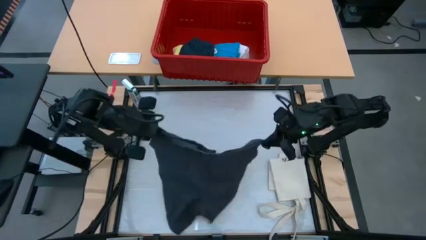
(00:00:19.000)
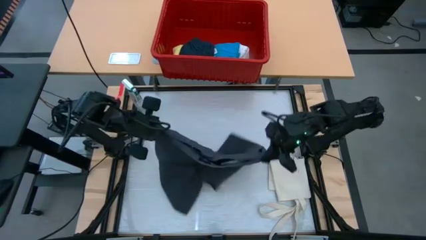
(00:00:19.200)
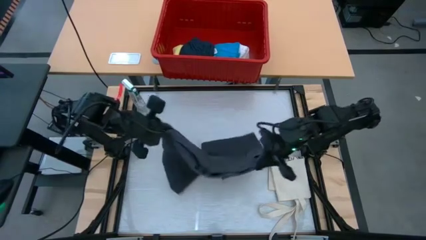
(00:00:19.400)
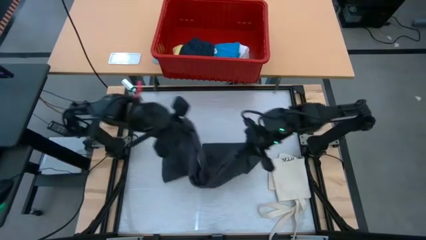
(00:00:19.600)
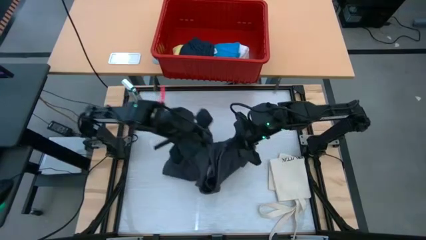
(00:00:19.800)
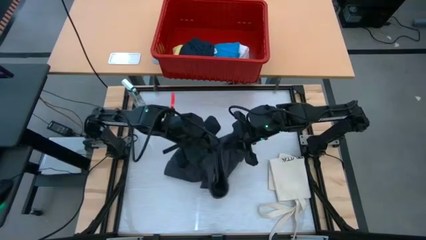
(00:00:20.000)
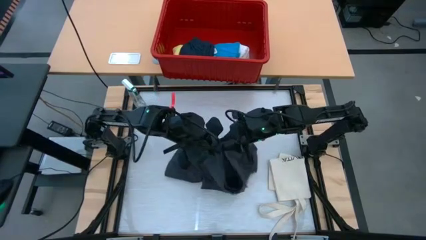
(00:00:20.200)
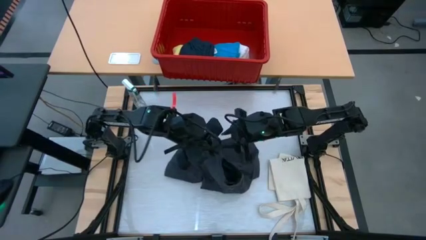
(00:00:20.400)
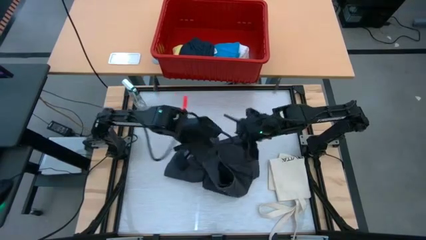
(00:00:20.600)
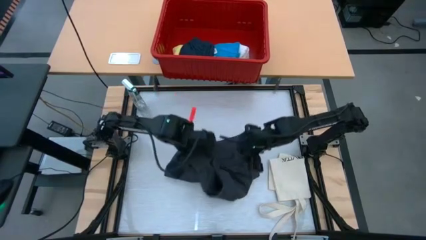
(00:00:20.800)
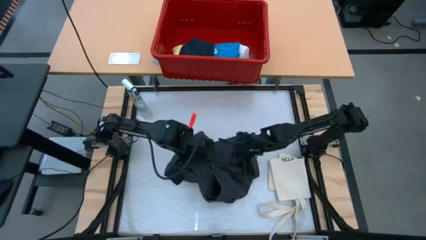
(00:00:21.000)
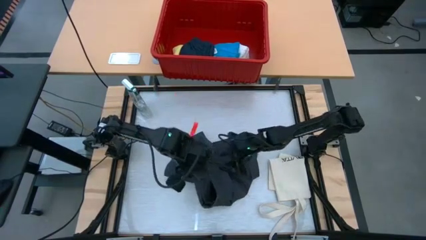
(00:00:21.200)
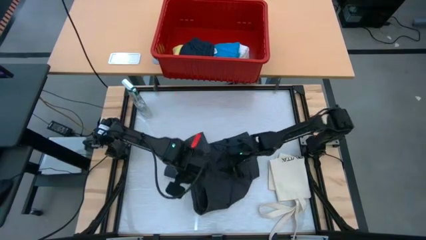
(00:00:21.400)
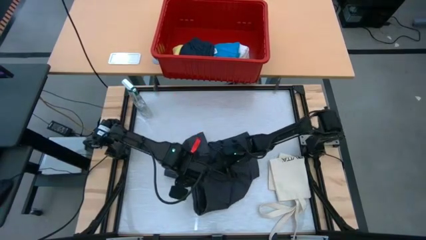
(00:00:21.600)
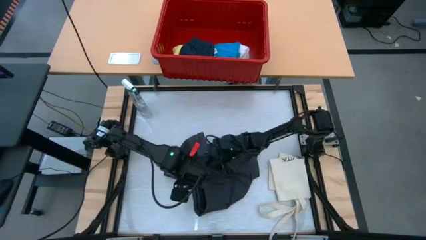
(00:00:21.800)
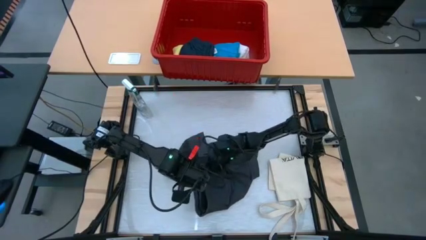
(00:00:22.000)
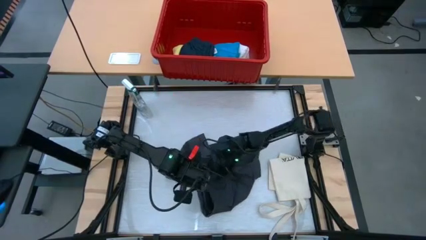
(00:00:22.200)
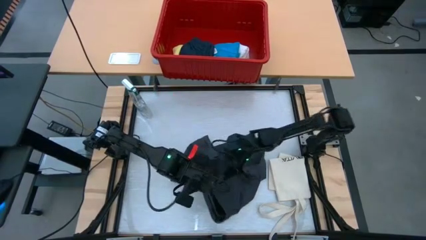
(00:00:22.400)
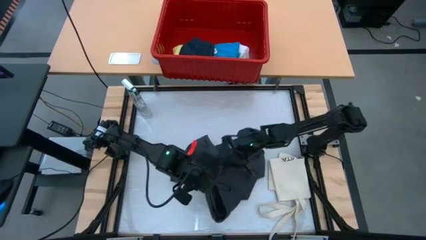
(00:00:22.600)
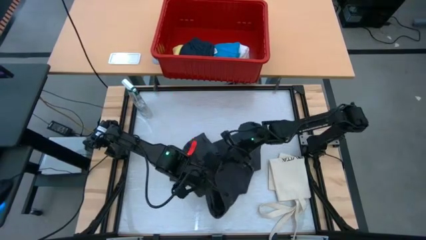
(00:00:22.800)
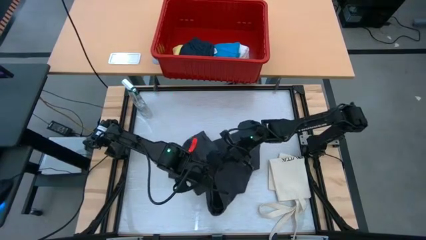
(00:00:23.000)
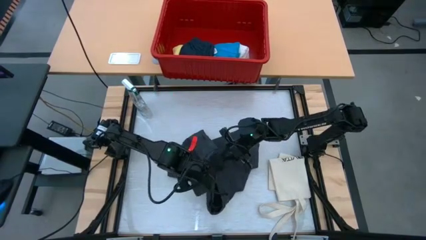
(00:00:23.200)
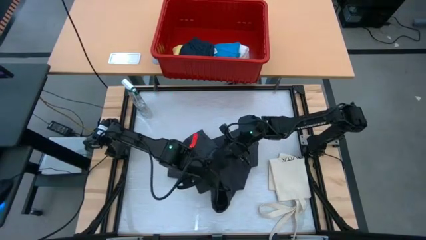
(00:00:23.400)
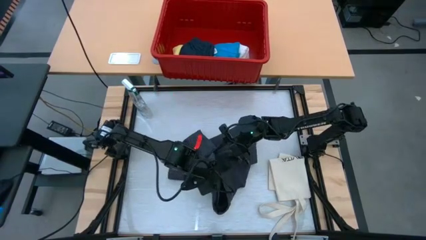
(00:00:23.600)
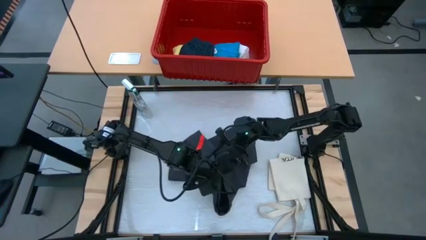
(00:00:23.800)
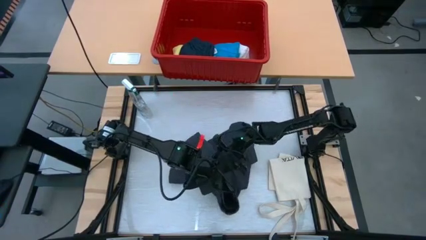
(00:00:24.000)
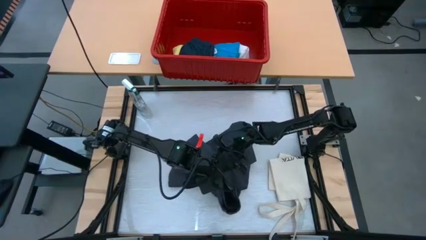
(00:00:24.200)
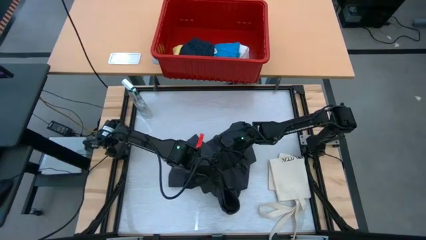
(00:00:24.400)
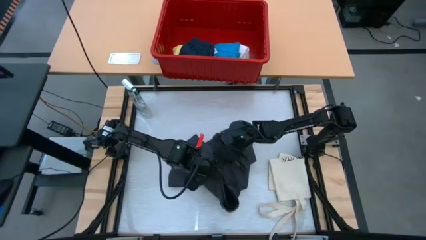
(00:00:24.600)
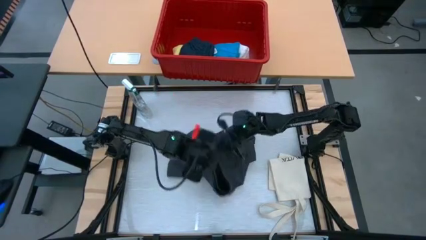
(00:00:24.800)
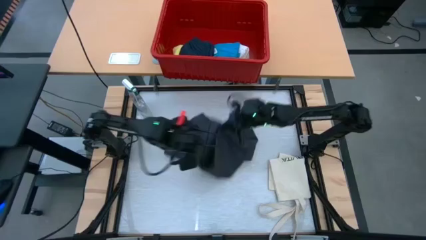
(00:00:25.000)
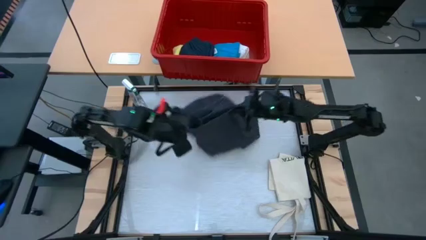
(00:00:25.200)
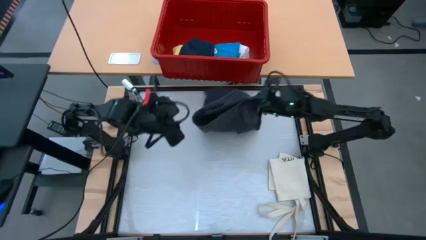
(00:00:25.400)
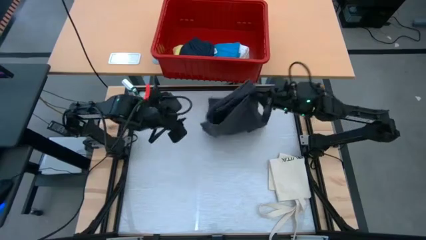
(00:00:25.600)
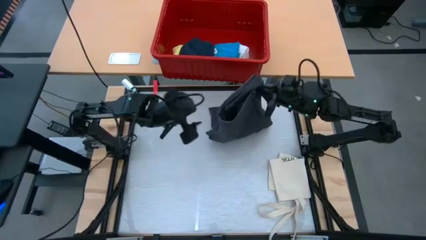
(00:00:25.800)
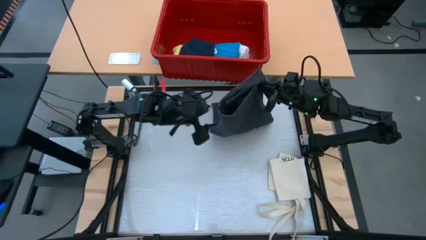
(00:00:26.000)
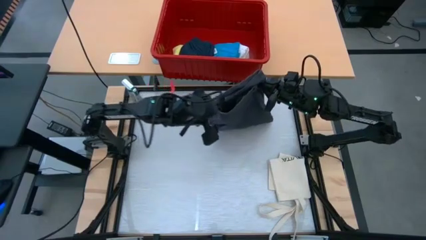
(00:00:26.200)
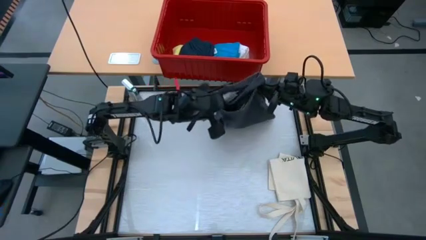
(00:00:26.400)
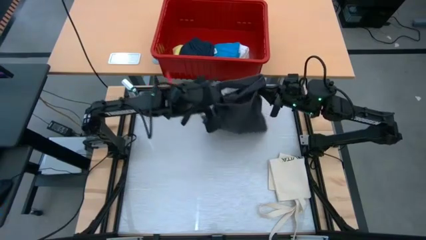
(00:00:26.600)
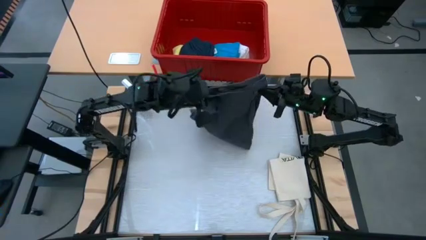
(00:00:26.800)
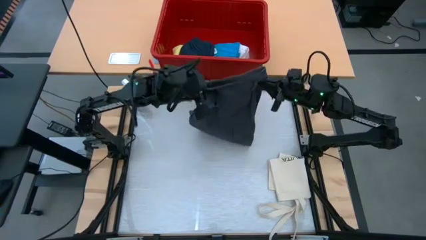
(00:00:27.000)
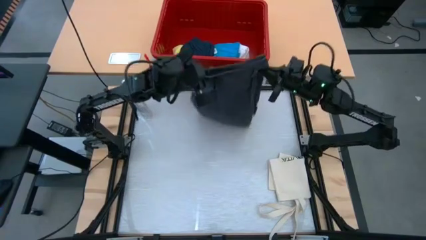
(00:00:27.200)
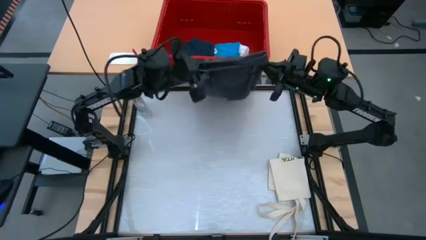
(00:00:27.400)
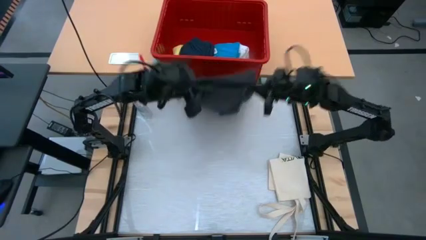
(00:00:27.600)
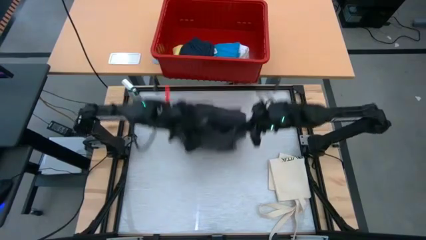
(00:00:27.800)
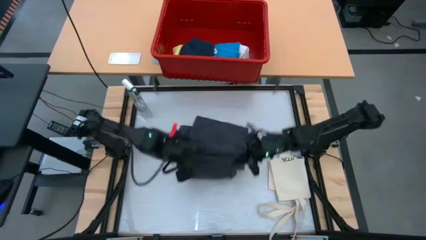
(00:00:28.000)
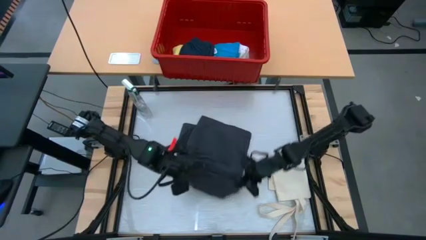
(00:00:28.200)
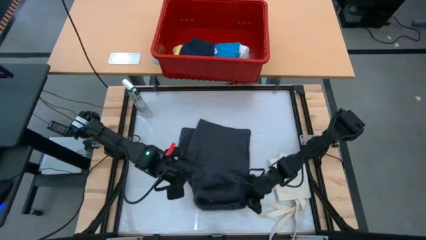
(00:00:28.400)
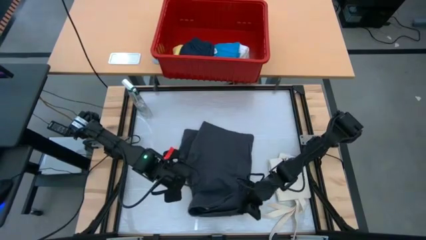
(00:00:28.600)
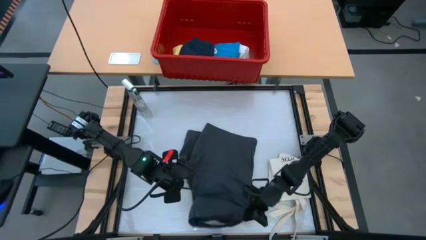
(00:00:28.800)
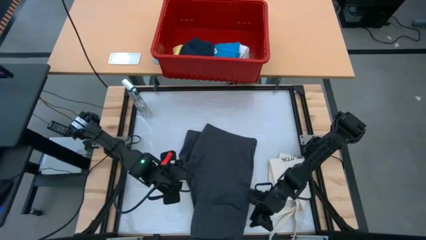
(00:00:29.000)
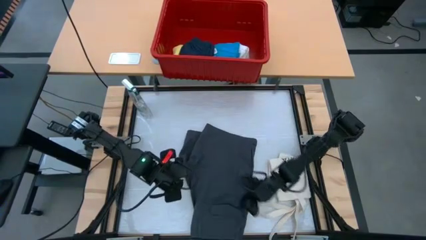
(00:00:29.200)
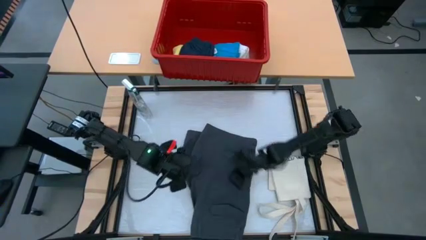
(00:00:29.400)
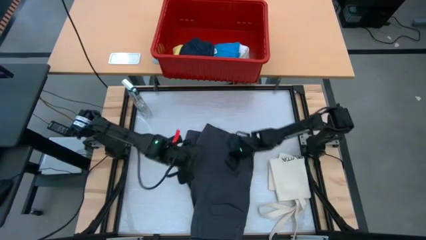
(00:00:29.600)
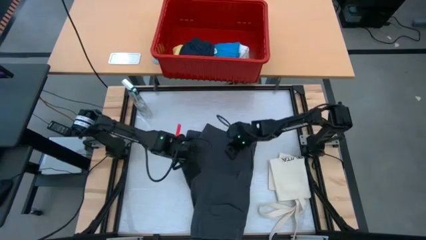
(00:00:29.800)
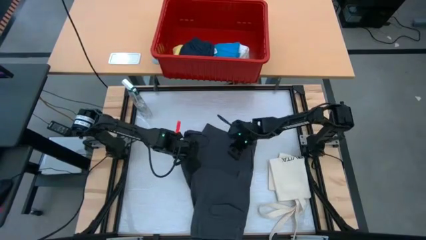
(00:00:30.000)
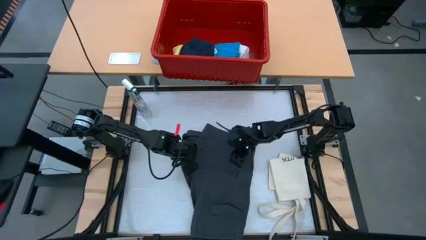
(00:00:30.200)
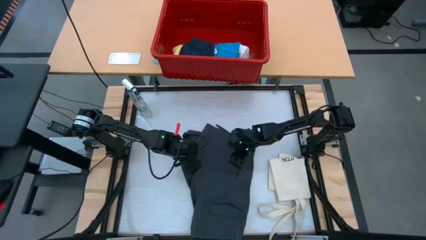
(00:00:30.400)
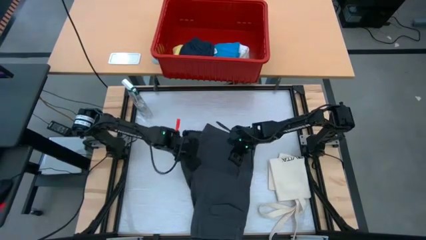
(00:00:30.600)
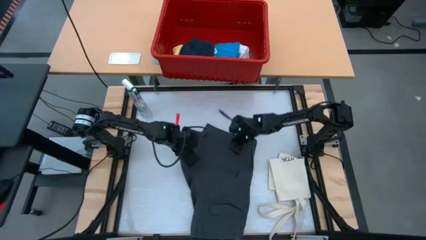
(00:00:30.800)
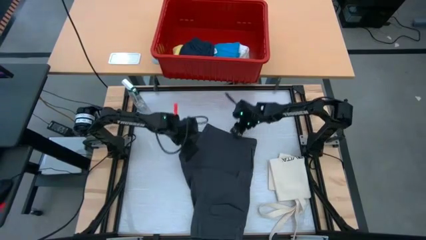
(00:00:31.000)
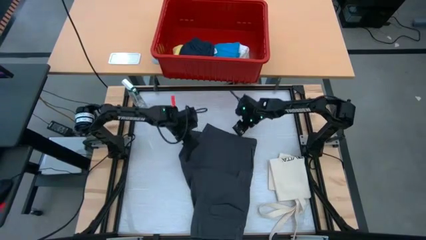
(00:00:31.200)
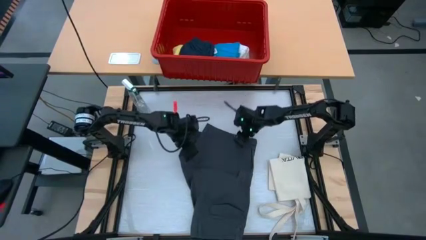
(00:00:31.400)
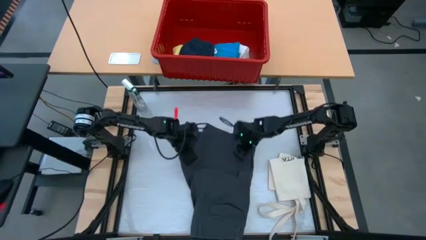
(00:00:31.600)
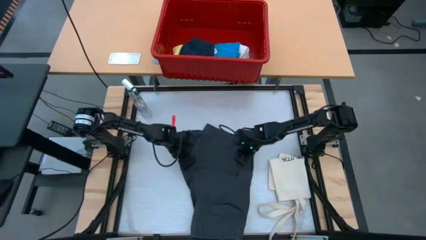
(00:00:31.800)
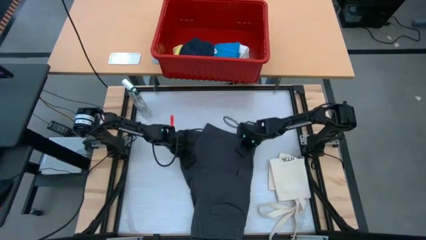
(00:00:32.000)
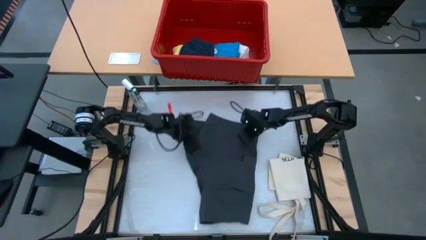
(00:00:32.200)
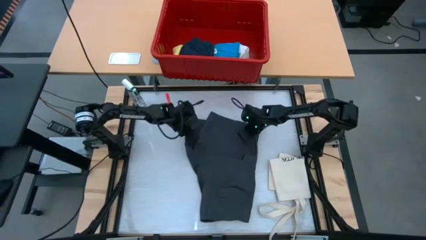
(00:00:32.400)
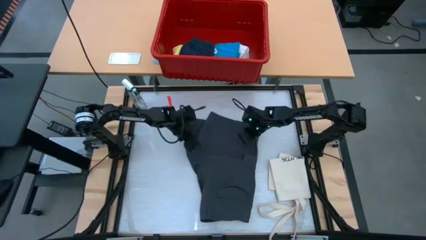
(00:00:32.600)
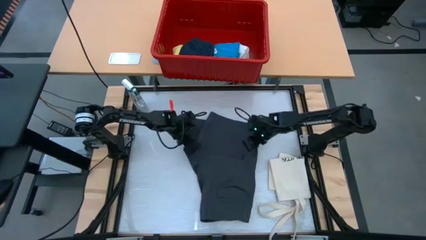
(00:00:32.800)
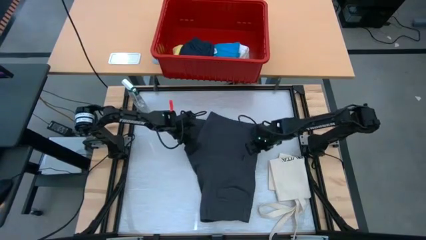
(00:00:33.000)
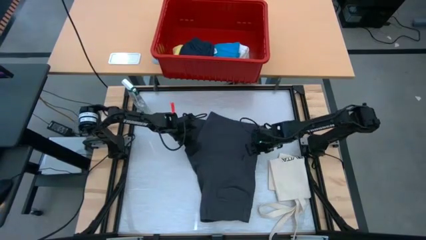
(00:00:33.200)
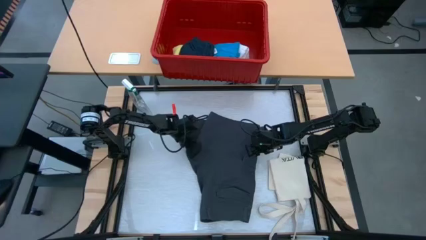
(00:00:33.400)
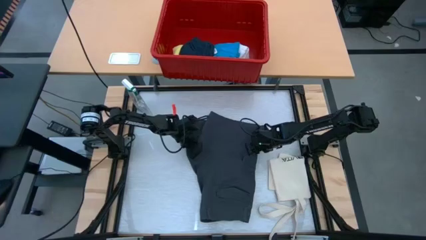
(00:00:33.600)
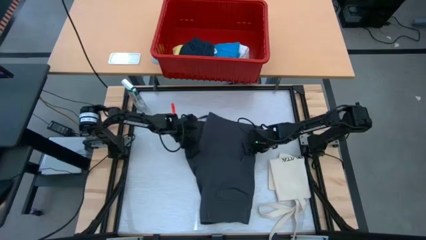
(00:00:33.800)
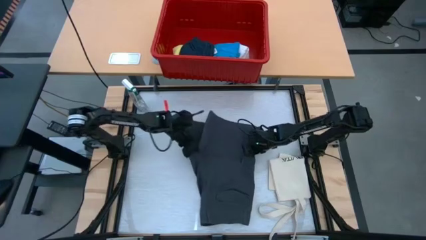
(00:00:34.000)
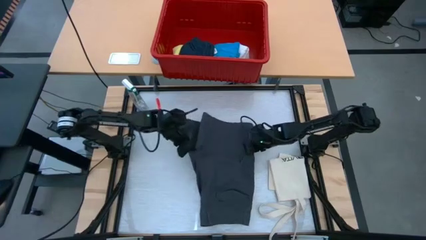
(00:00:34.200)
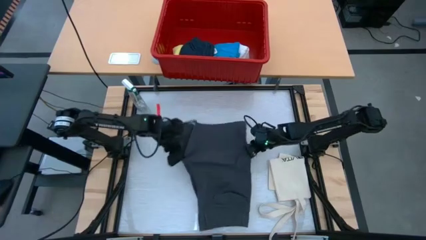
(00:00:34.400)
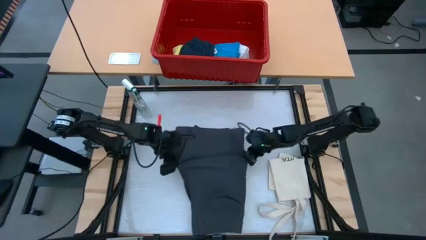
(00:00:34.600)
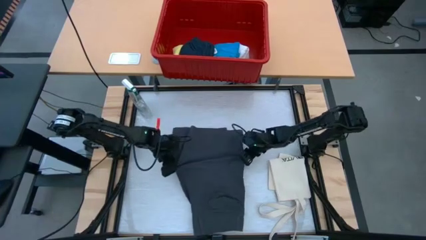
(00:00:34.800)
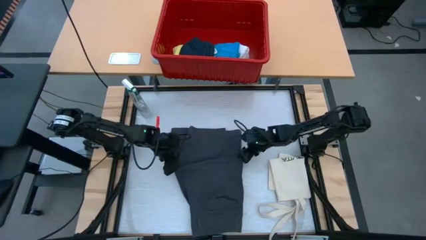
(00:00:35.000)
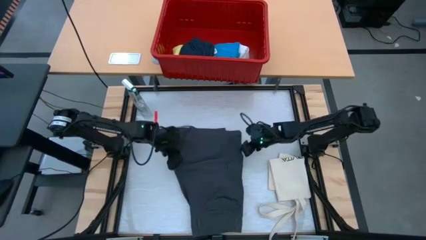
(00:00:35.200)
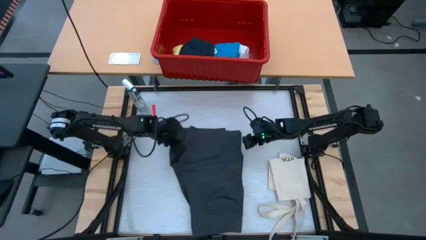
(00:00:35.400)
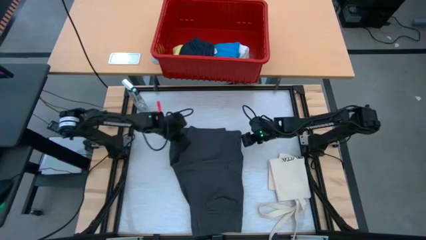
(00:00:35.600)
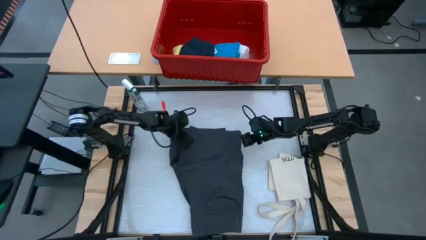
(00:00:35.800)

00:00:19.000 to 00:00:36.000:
Task: Fold laundry
Fold the dark blue shorts
